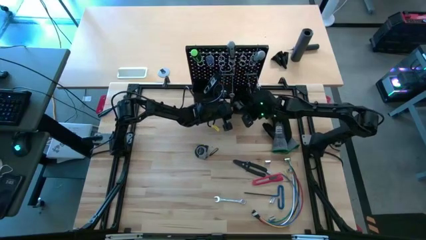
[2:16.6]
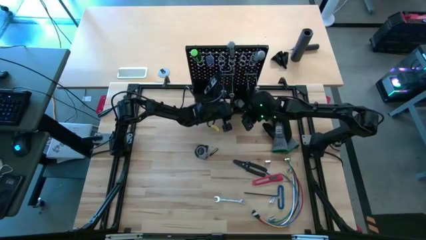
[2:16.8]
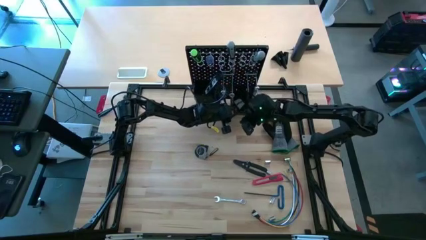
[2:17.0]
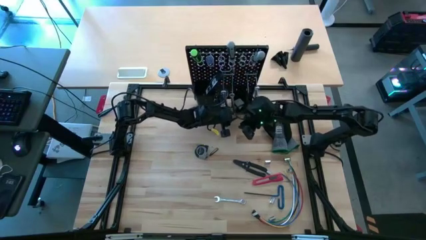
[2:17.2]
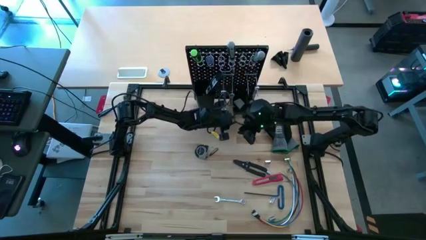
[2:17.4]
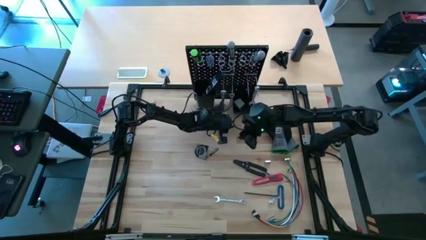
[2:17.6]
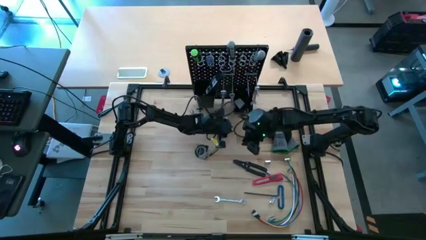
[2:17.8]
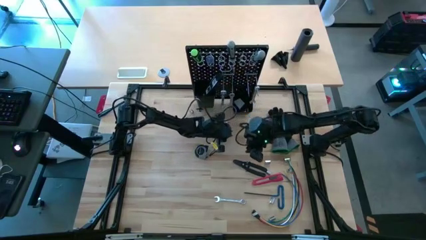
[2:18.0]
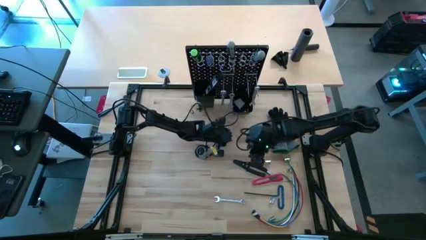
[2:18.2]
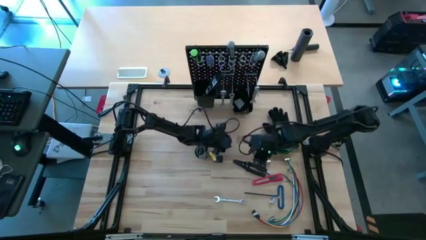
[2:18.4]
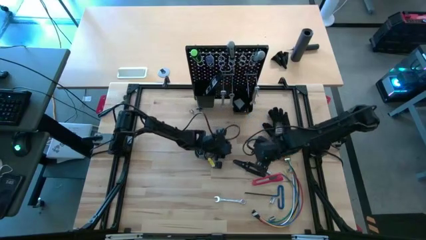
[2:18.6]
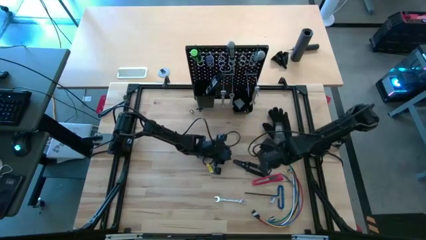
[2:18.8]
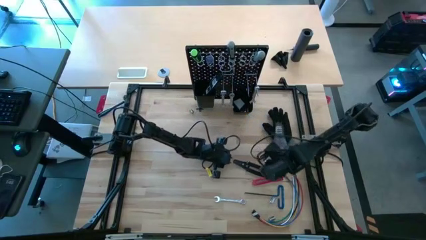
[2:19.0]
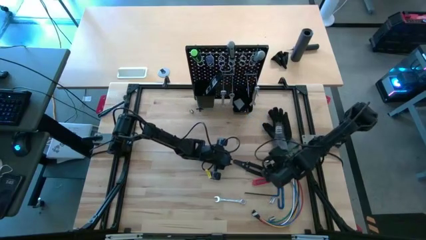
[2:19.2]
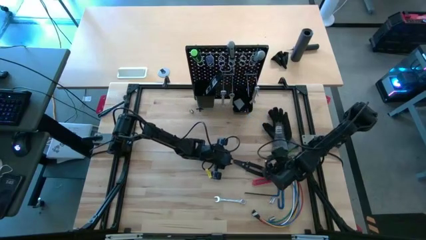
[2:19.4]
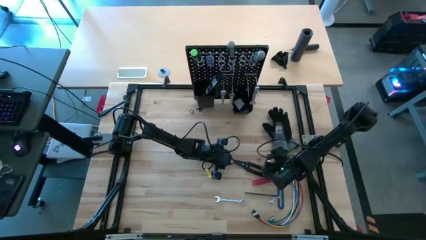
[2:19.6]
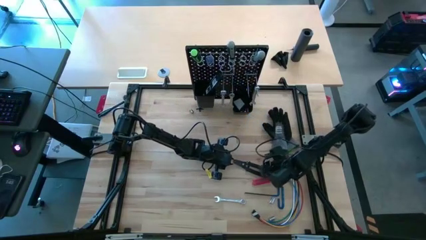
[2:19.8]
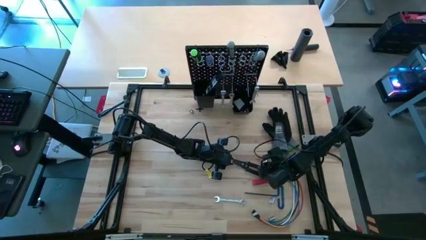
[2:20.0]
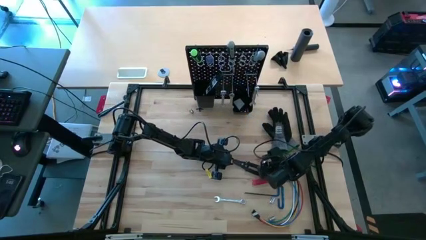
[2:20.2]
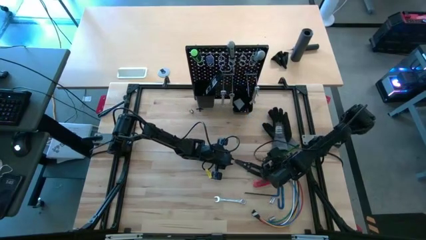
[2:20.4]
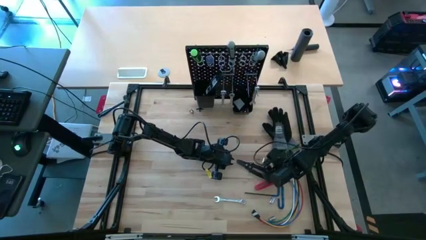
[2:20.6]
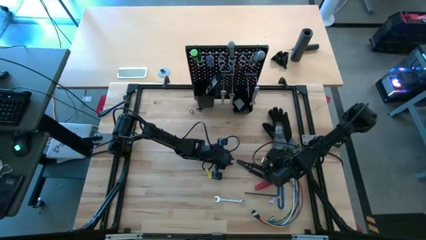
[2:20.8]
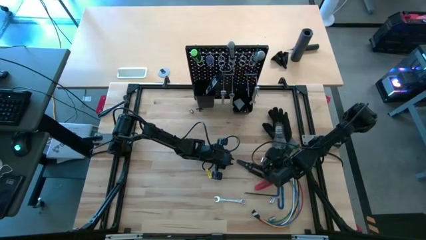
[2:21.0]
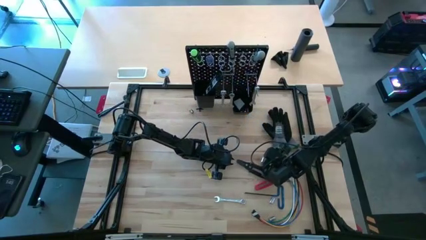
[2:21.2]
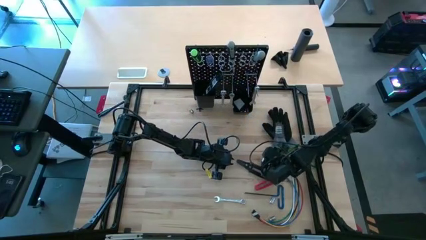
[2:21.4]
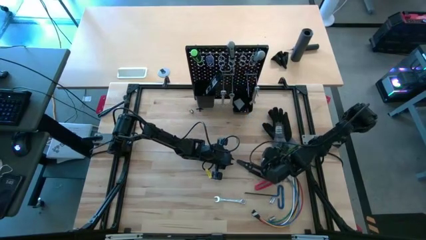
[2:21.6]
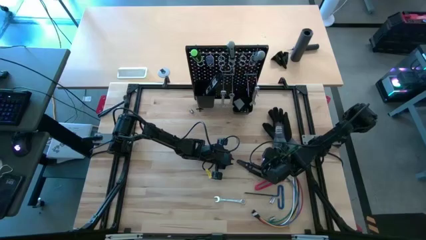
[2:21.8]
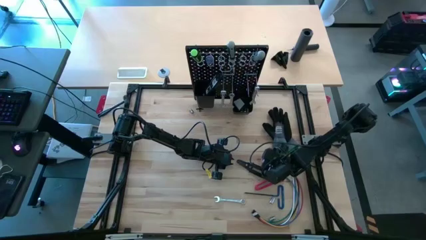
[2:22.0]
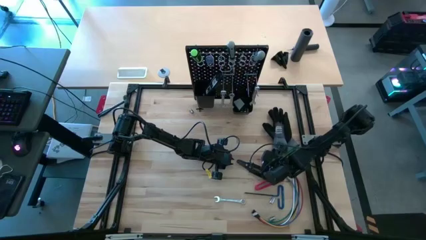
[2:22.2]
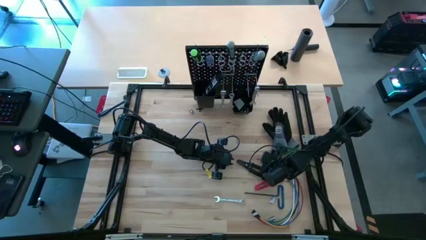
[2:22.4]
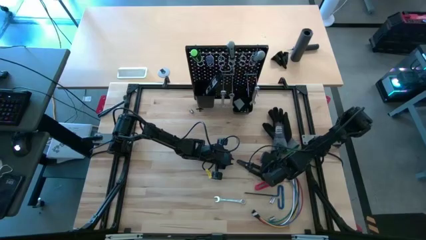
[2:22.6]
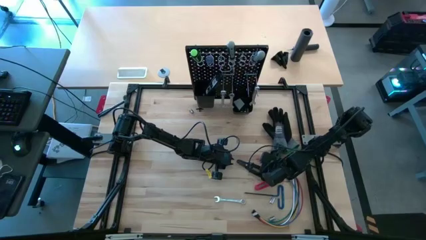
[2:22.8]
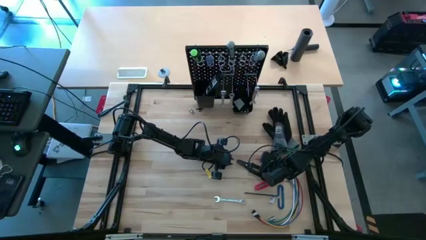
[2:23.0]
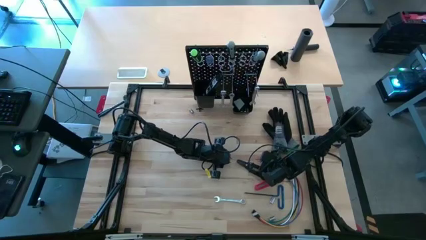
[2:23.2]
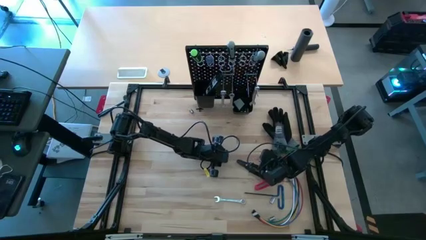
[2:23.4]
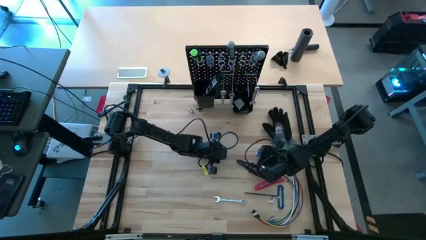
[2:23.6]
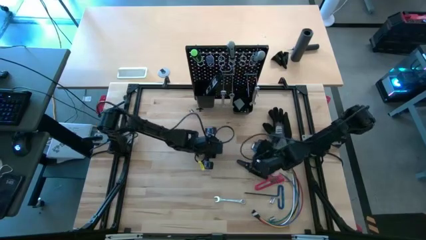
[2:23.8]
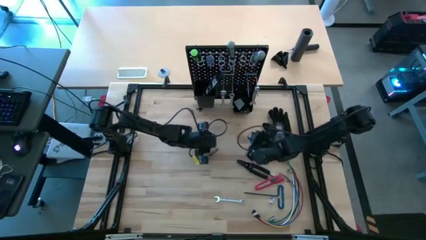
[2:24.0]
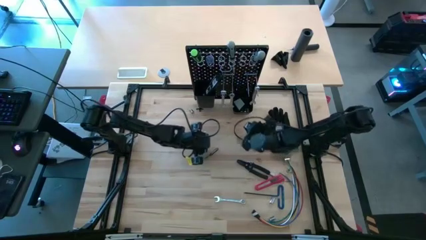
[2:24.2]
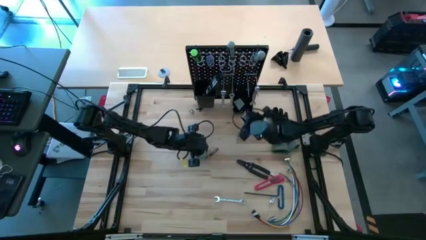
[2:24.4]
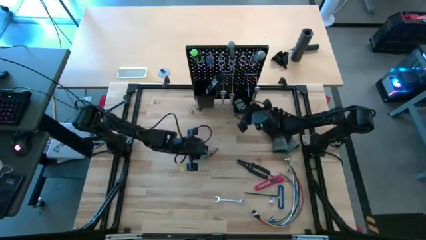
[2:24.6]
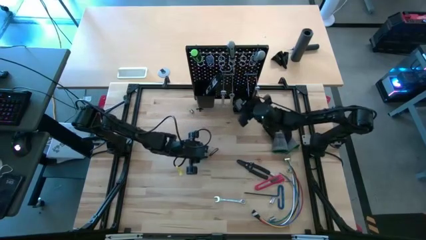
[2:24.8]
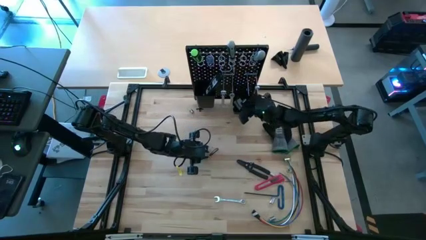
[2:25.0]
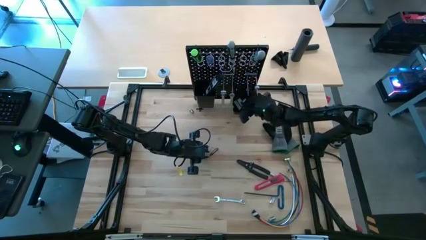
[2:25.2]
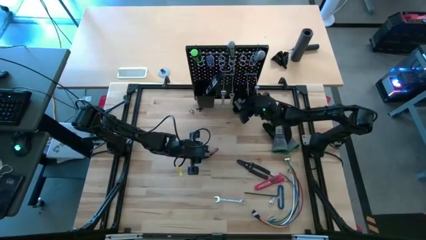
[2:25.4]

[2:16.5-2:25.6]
Task: Hang tools onto peg board
Put the silver socket on the right black bin on the peg board

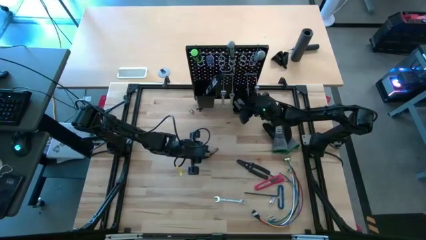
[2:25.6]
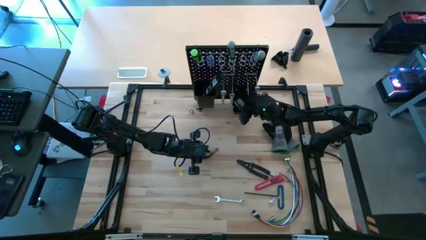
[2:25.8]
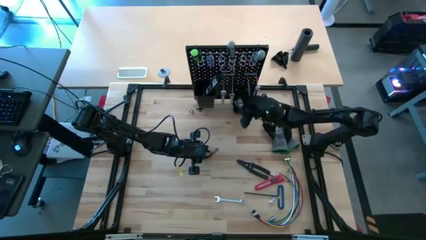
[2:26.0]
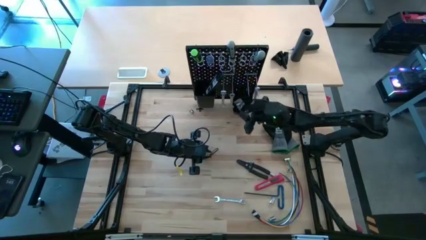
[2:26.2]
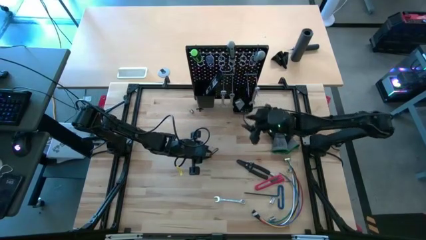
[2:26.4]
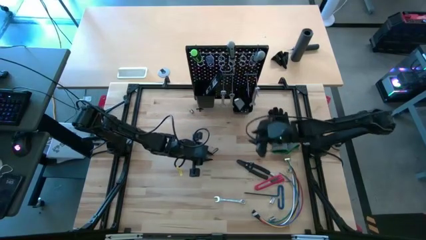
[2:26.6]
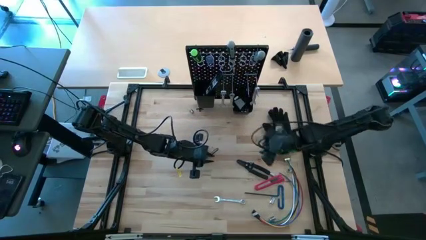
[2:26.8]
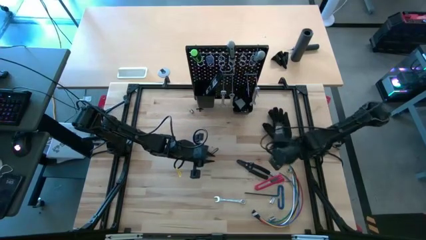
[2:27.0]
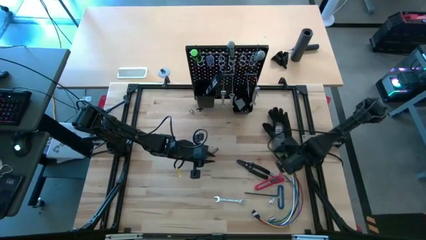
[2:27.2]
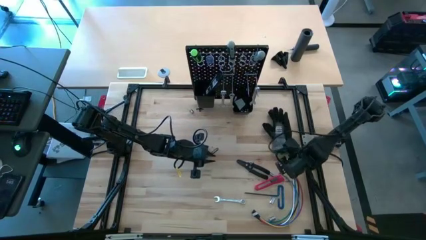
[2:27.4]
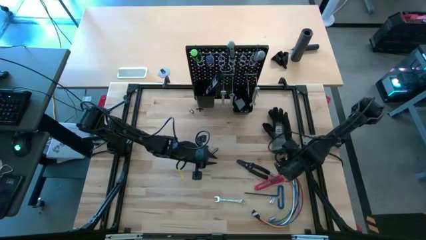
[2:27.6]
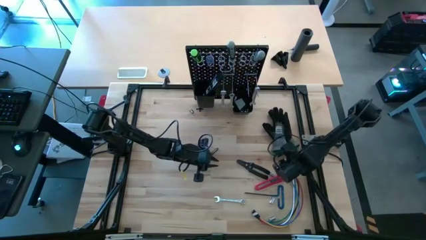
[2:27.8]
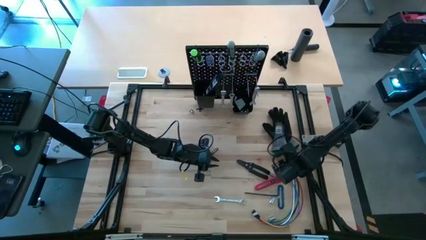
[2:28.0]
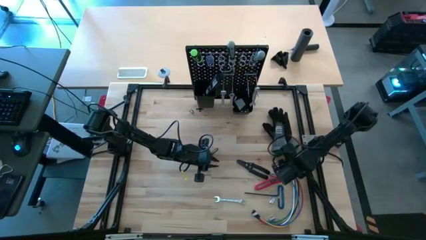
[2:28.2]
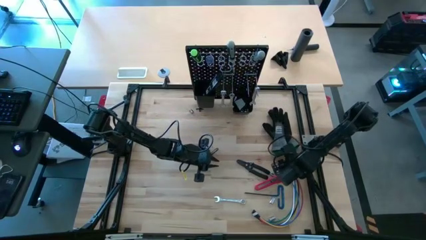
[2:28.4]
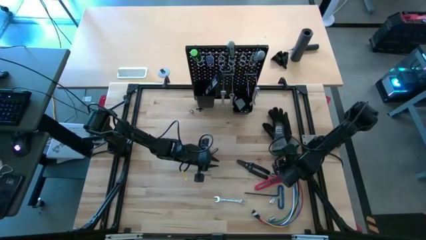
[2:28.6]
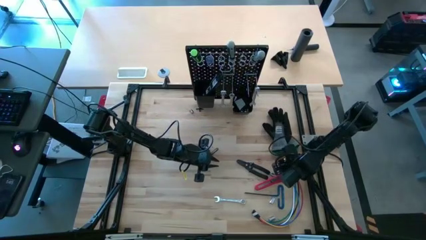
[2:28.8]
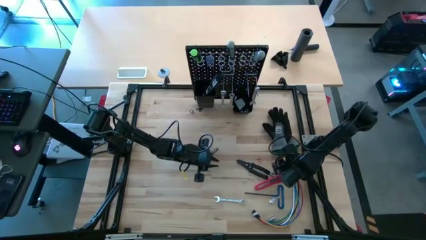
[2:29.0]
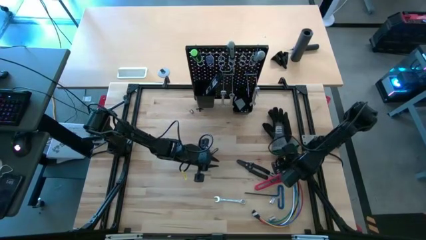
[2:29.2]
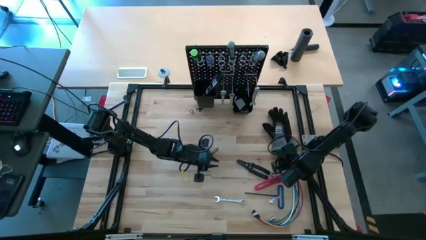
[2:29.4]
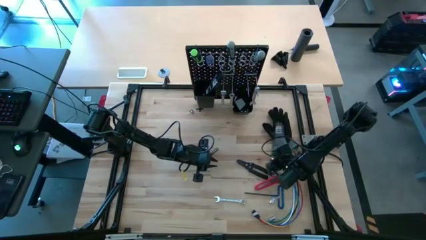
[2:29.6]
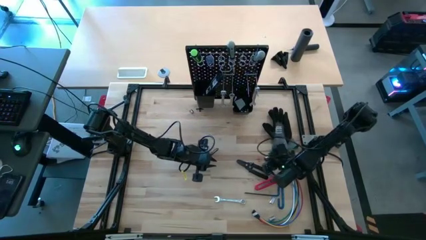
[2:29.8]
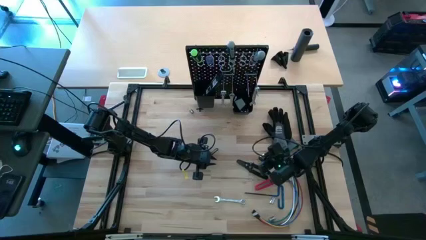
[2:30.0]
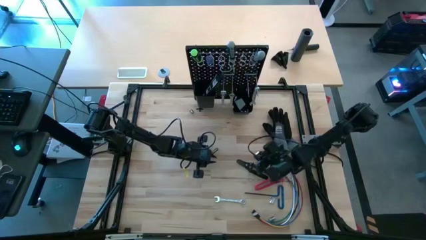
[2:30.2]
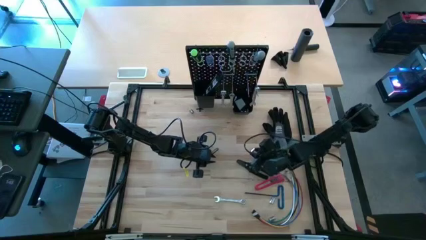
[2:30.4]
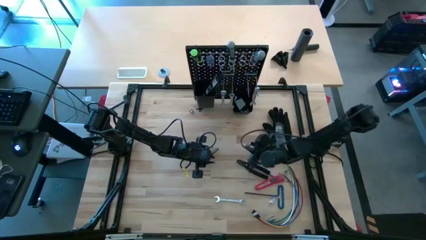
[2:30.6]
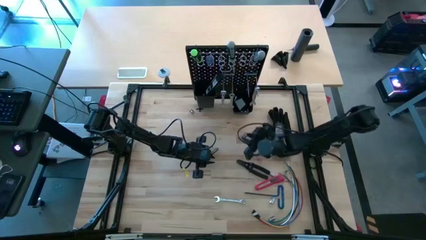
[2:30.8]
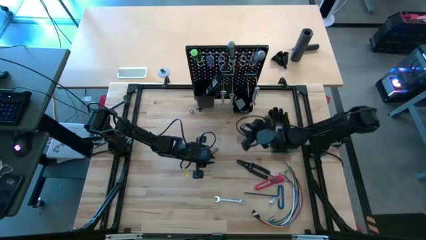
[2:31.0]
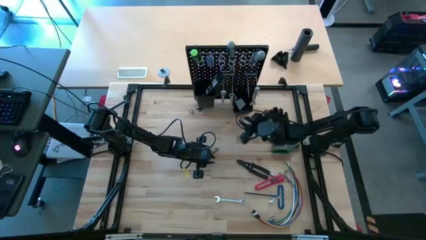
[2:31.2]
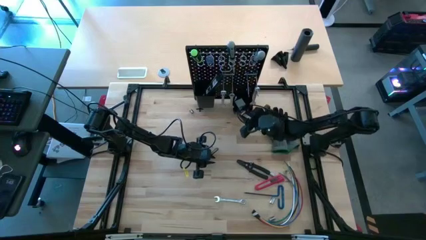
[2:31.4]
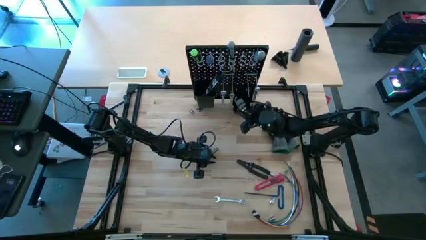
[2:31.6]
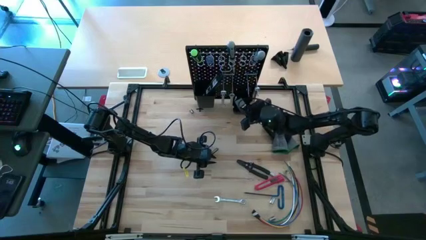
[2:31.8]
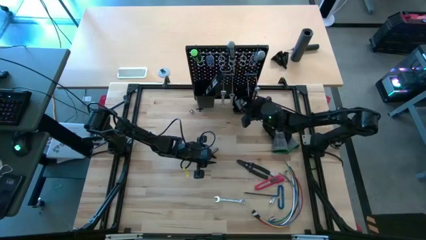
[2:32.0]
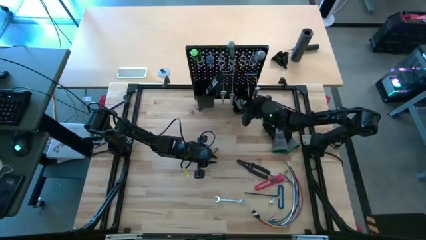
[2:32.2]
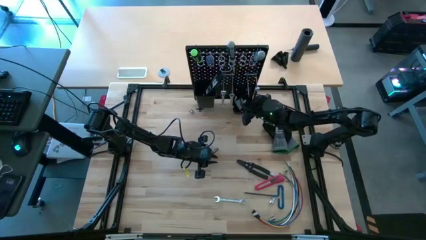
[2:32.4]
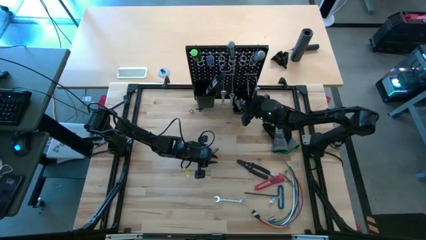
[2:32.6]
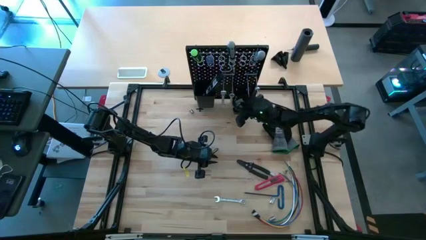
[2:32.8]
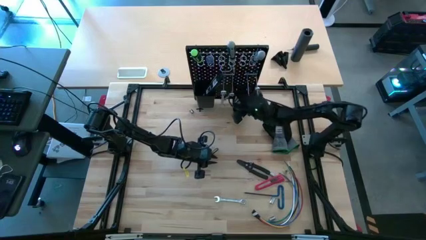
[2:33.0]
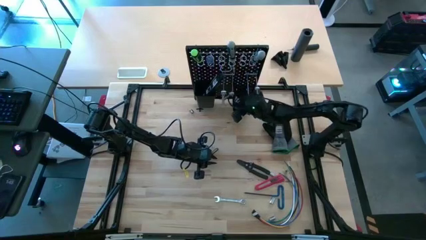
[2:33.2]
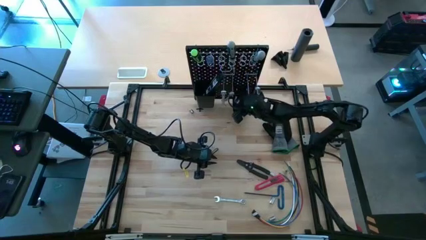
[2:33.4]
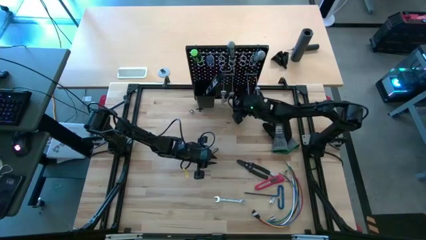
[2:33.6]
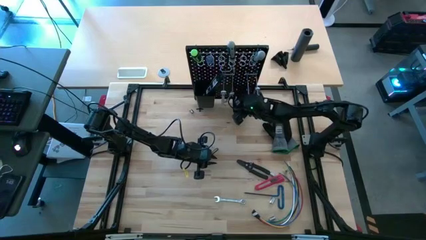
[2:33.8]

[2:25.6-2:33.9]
Put the silver socket driver on the right black bin on the peg board
